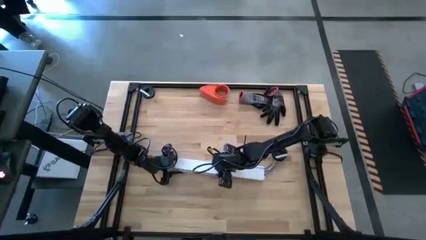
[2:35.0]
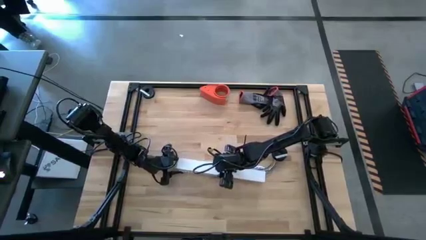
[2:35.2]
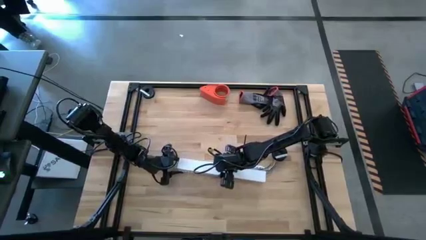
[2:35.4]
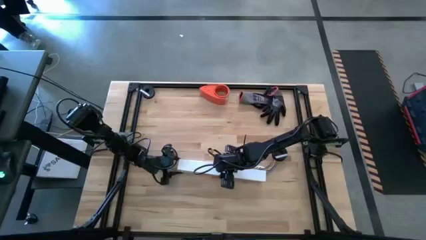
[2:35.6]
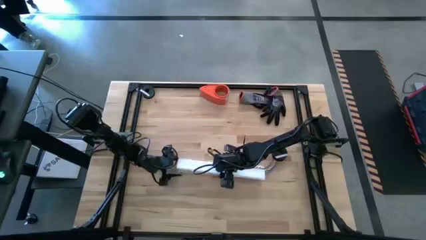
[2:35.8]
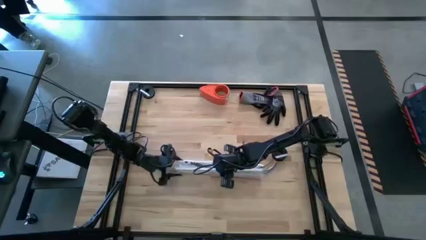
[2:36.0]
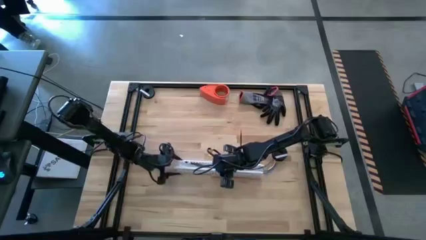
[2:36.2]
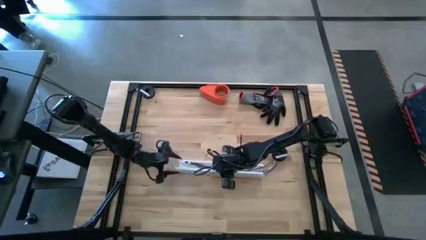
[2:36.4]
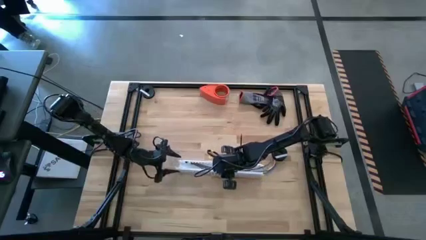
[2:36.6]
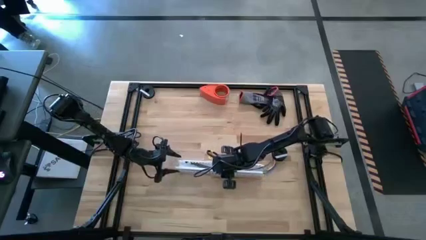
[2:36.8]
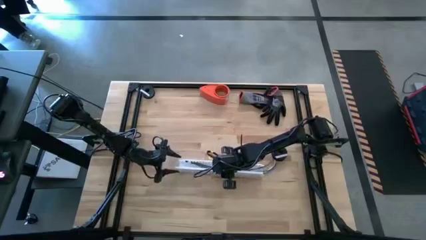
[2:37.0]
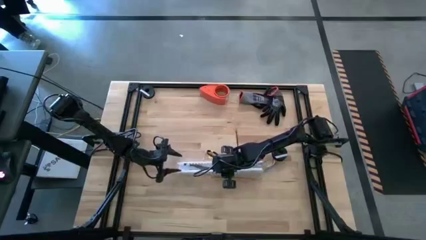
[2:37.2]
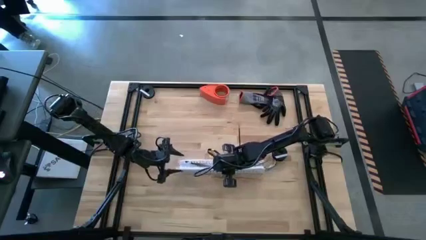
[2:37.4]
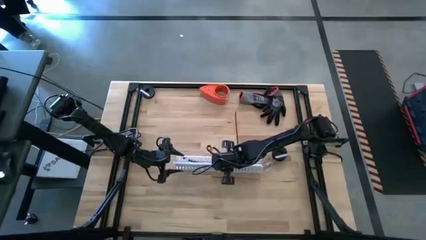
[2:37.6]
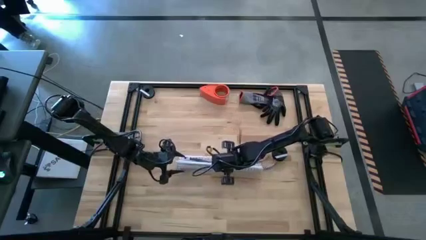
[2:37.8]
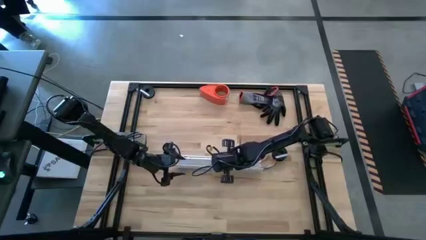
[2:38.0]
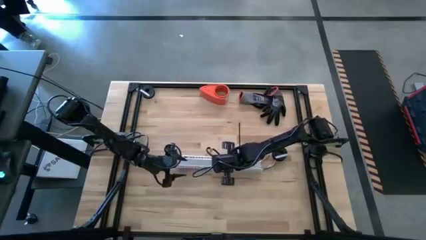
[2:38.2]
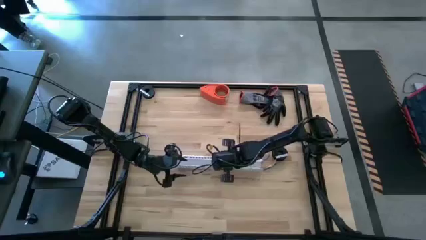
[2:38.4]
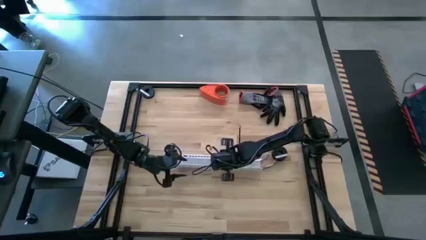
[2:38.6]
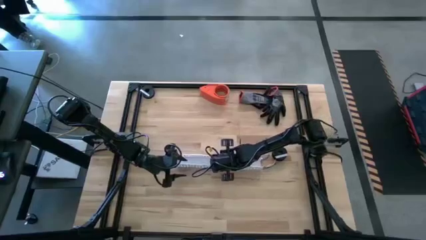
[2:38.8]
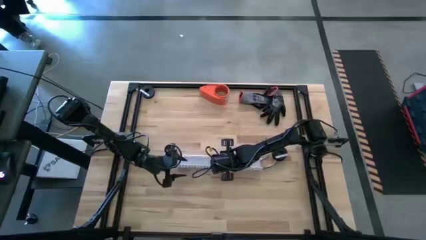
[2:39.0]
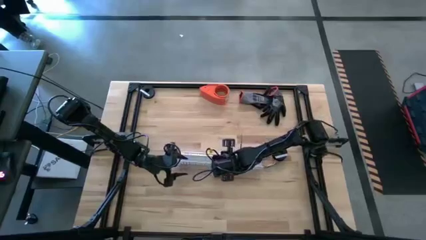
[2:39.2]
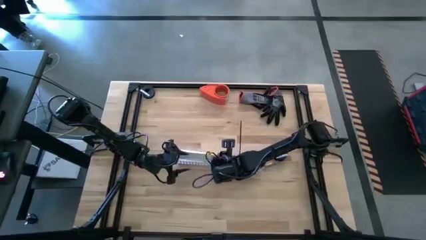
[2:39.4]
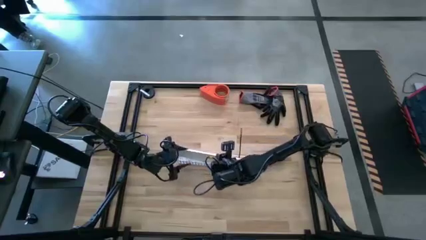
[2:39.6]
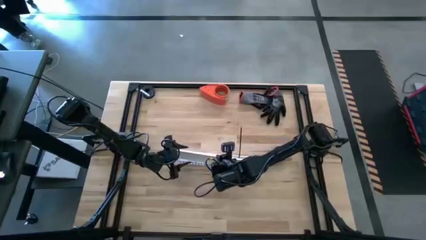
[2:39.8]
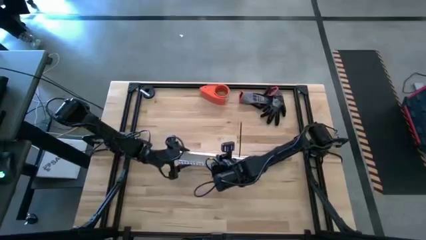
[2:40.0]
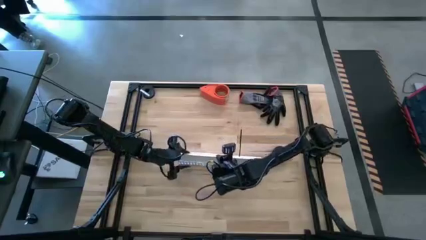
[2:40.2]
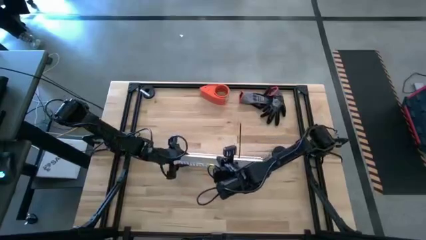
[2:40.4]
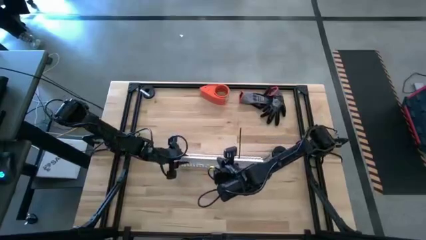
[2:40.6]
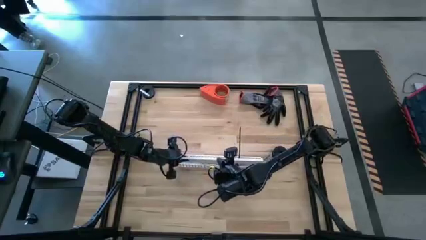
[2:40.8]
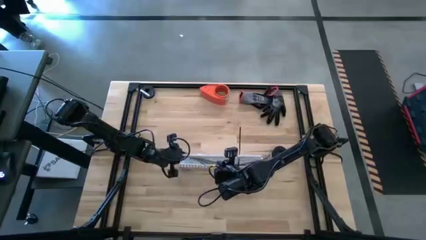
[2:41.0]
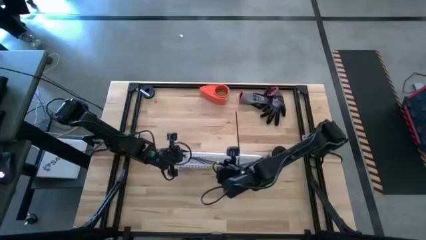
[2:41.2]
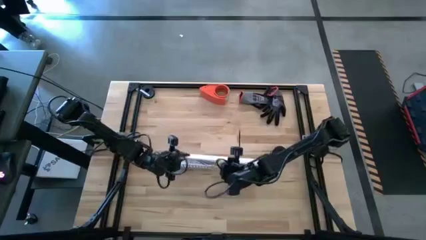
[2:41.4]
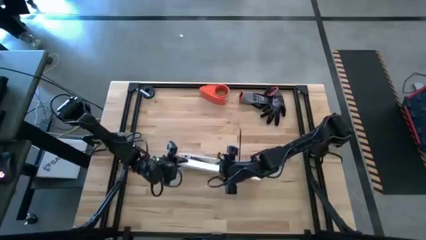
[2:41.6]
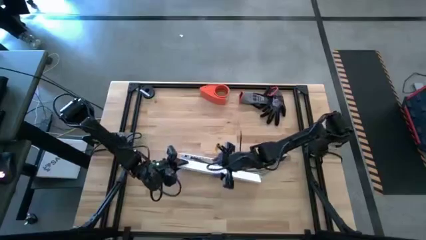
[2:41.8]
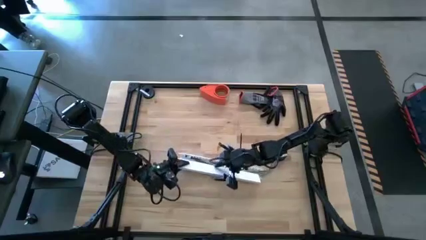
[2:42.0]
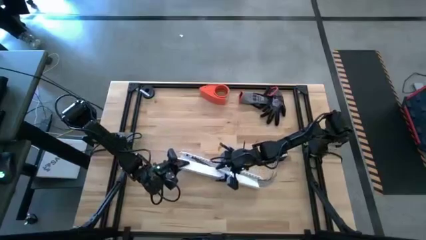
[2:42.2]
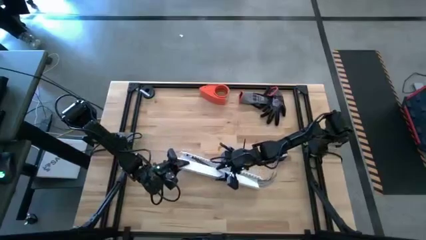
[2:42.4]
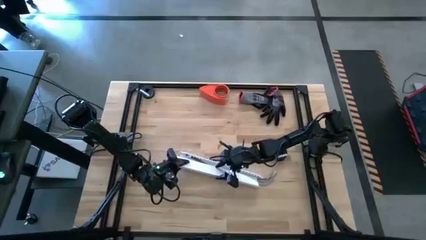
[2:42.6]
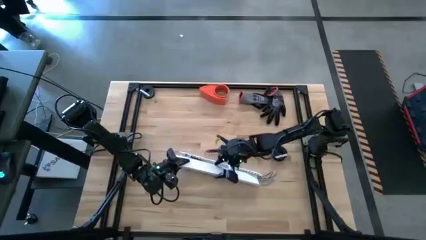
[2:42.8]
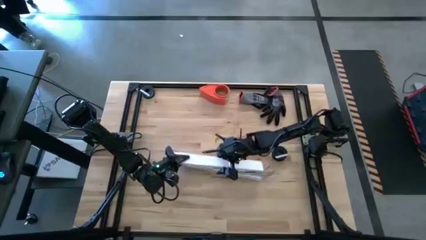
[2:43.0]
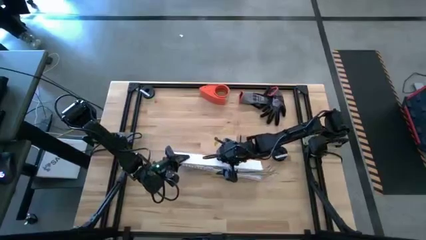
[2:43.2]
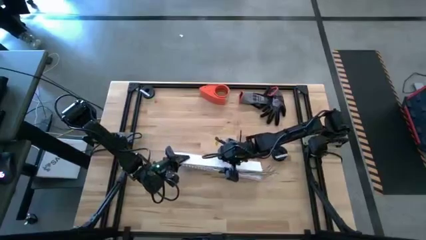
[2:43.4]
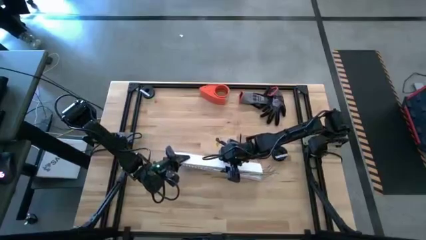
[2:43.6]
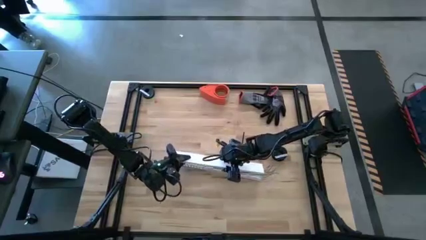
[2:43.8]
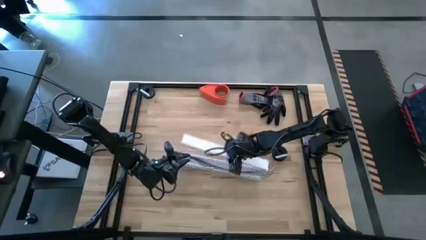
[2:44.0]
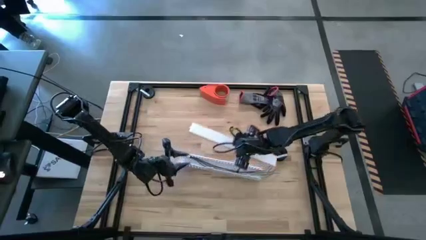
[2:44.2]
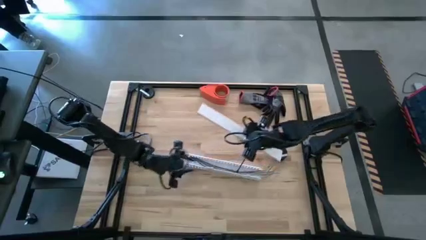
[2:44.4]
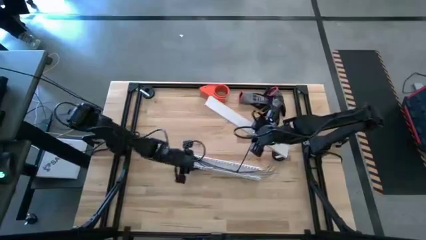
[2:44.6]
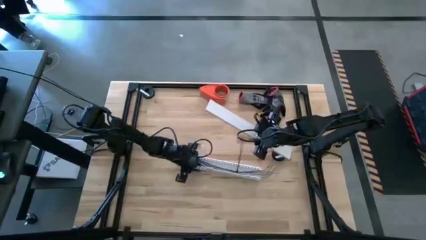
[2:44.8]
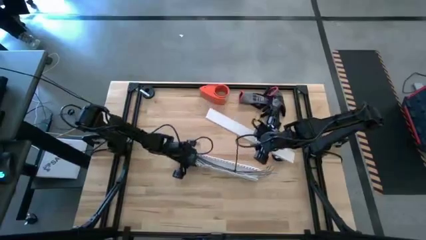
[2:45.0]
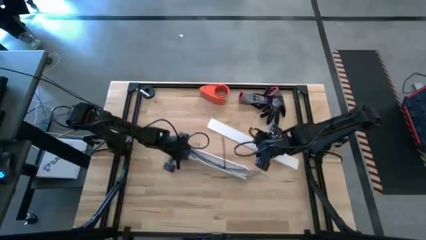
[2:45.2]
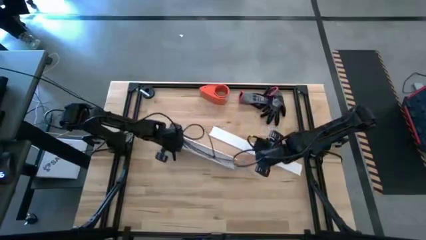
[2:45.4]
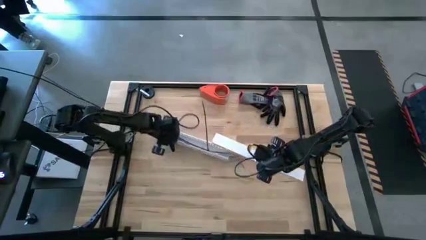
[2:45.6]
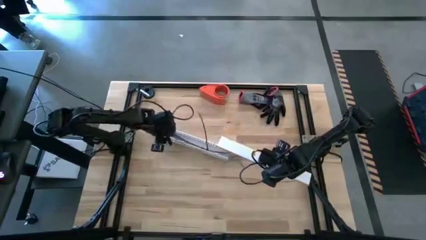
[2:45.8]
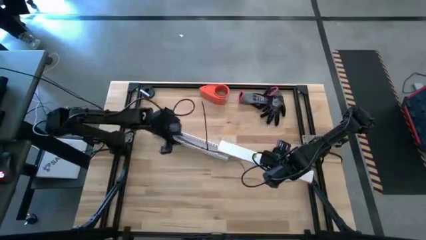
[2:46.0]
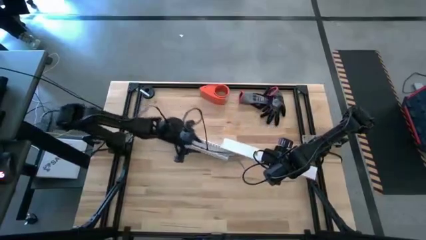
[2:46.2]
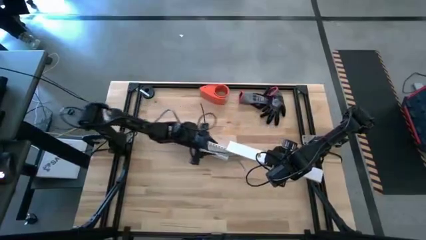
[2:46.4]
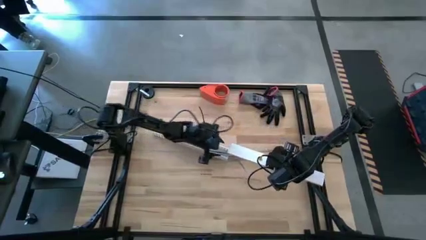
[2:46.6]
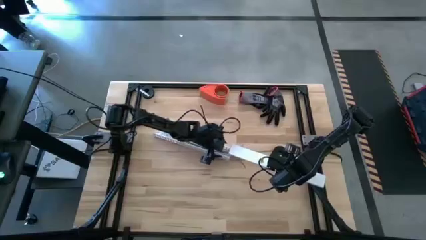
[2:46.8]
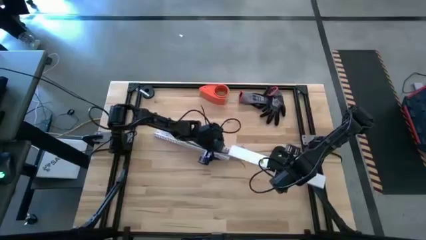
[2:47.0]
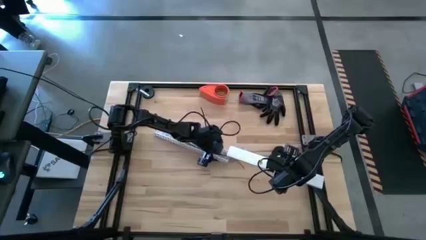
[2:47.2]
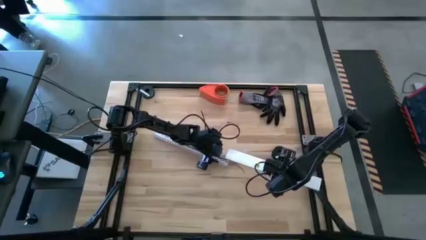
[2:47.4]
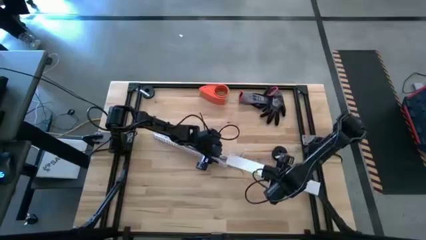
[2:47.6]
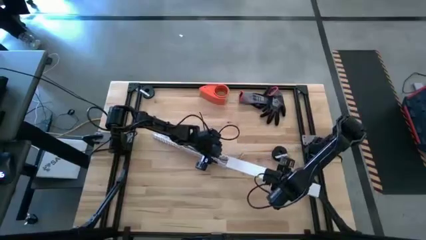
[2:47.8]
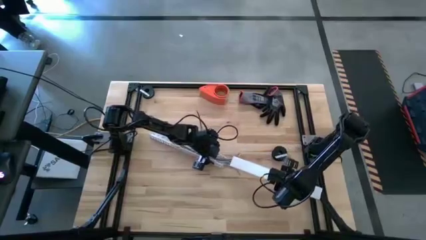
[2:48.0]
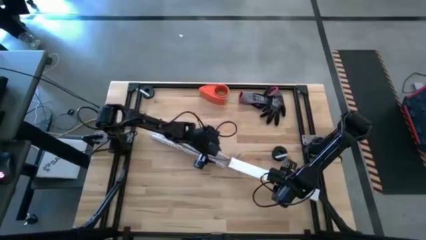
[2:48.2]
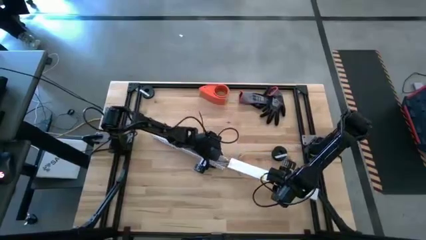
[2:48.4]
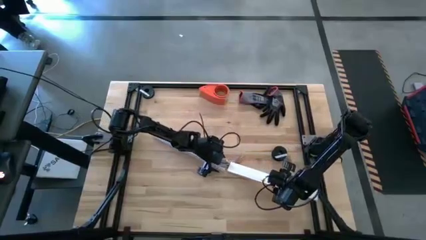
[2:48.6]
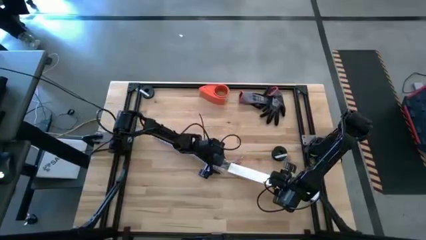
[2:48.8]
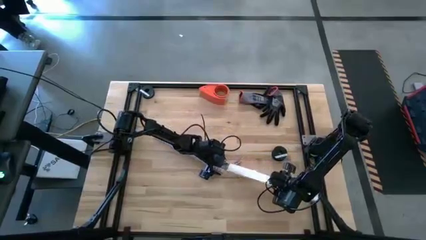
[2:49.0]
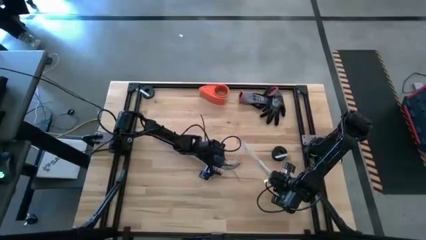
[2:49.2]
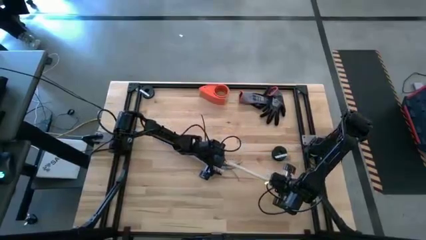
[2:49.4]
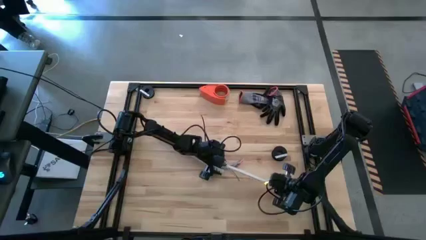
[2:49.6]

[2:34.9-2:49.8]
Task: Ziptie cables
Close the white cable duct
